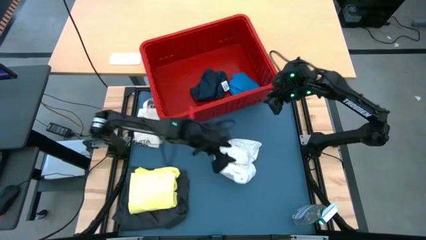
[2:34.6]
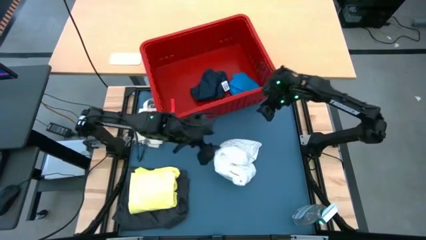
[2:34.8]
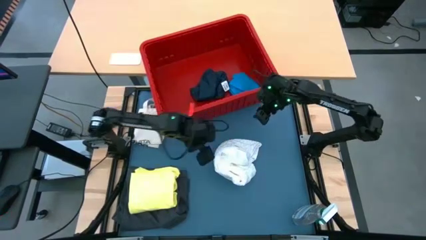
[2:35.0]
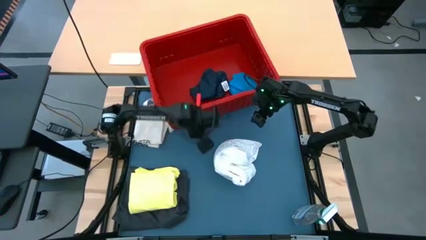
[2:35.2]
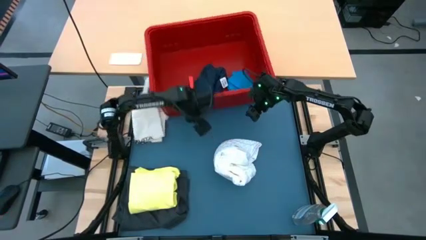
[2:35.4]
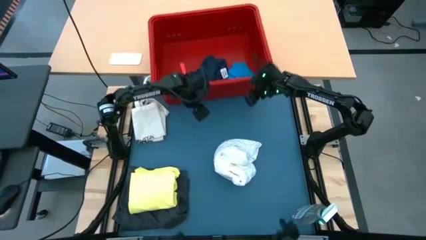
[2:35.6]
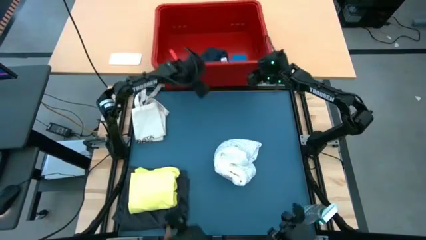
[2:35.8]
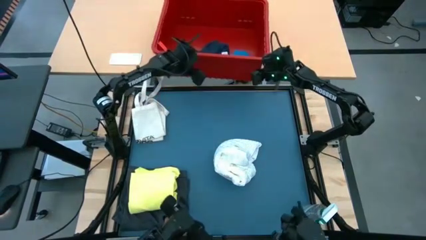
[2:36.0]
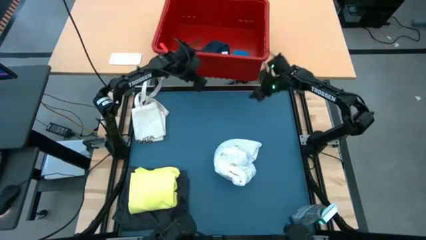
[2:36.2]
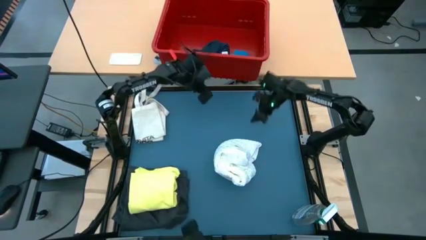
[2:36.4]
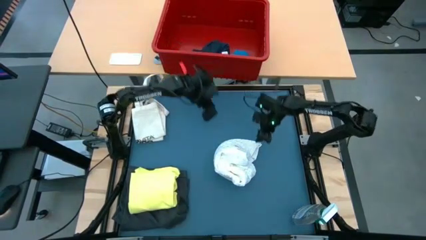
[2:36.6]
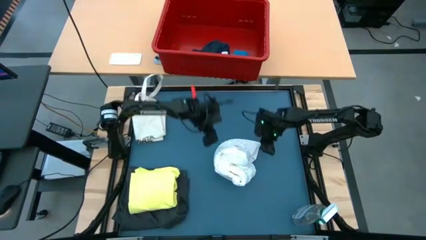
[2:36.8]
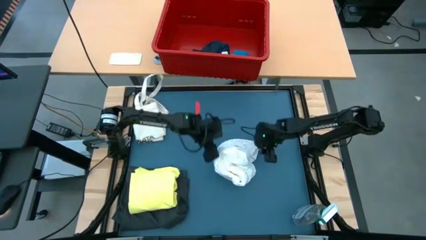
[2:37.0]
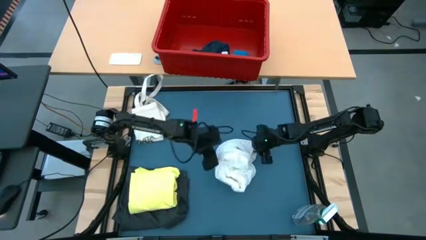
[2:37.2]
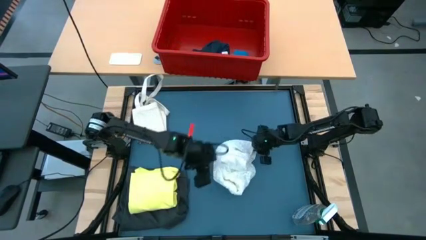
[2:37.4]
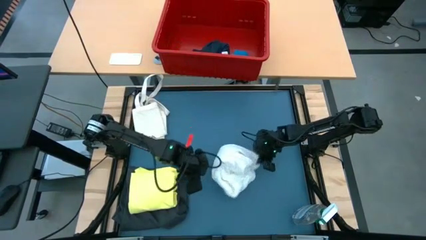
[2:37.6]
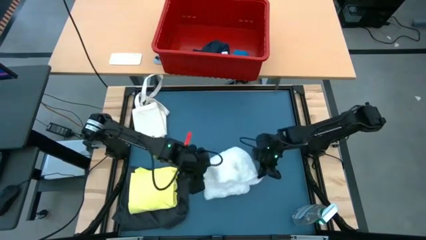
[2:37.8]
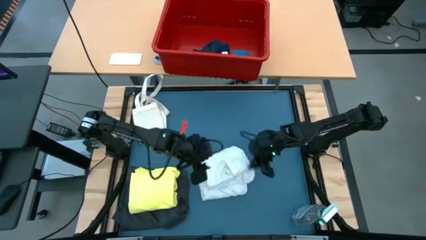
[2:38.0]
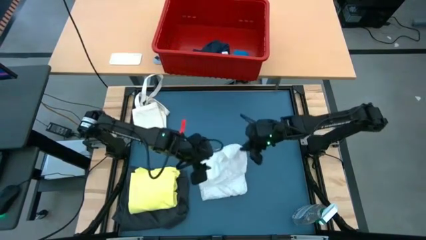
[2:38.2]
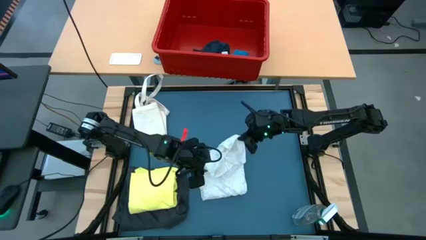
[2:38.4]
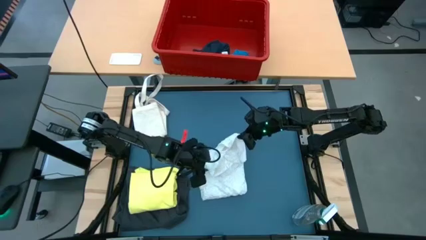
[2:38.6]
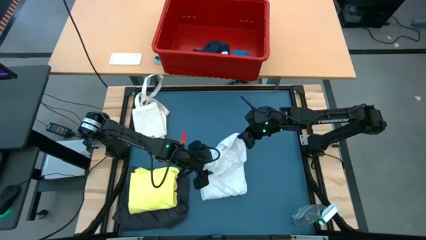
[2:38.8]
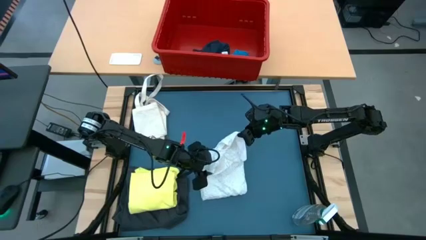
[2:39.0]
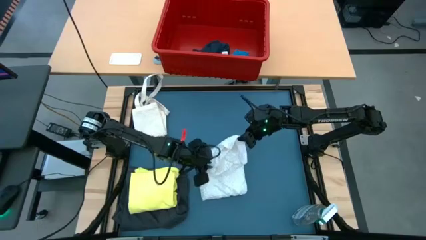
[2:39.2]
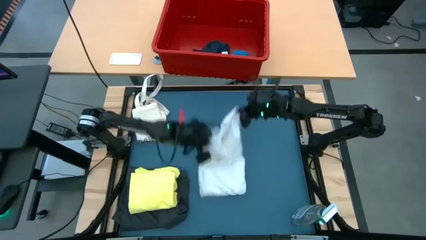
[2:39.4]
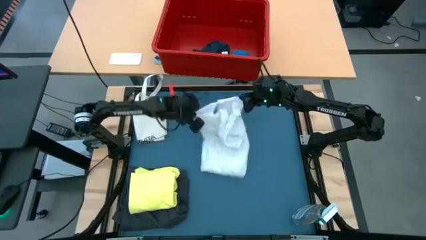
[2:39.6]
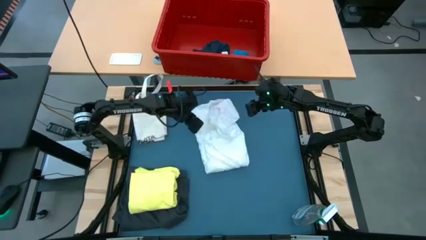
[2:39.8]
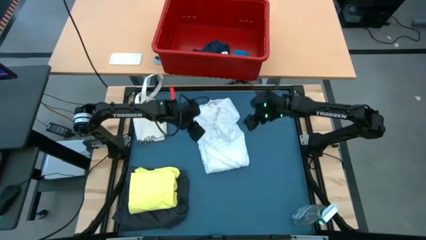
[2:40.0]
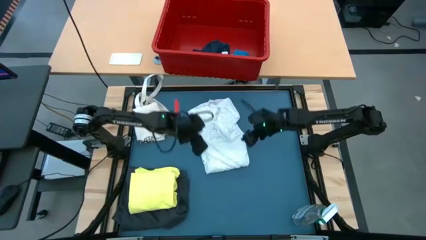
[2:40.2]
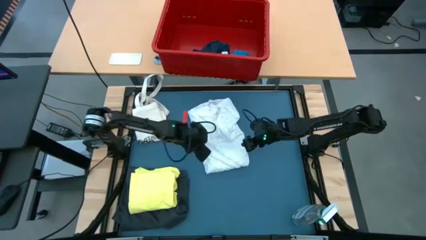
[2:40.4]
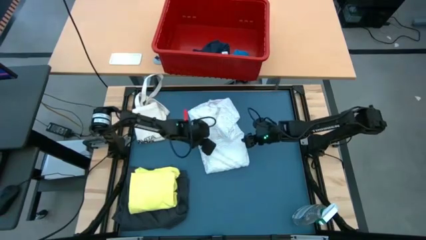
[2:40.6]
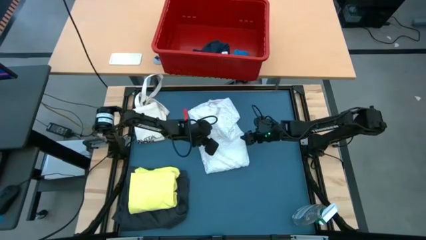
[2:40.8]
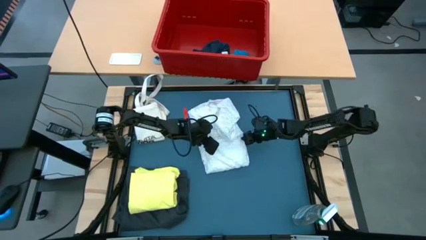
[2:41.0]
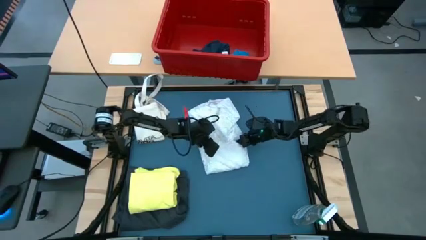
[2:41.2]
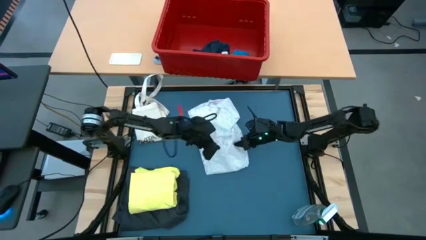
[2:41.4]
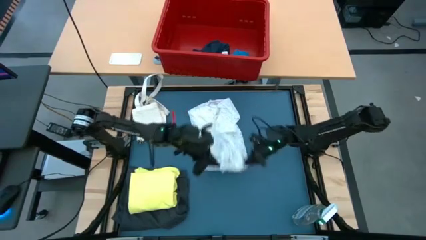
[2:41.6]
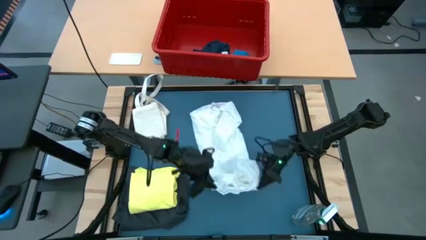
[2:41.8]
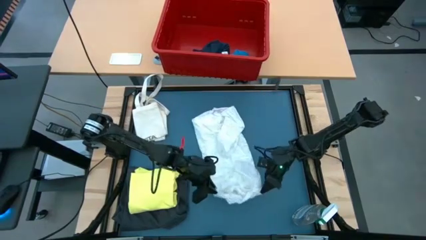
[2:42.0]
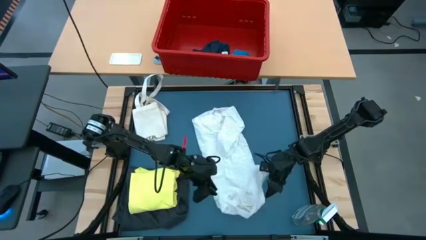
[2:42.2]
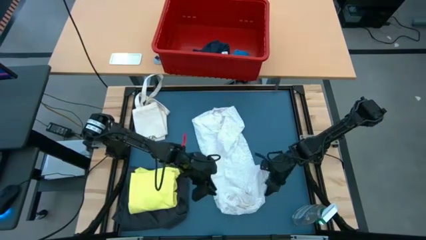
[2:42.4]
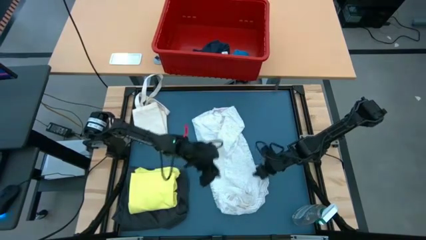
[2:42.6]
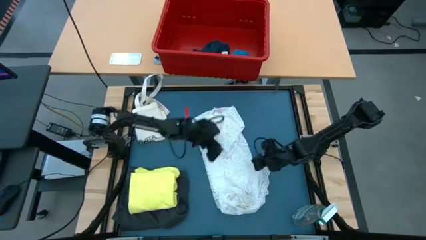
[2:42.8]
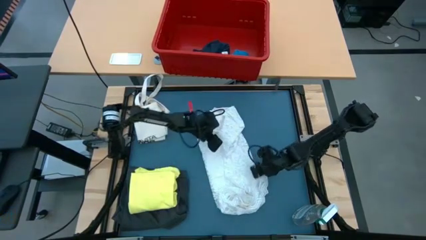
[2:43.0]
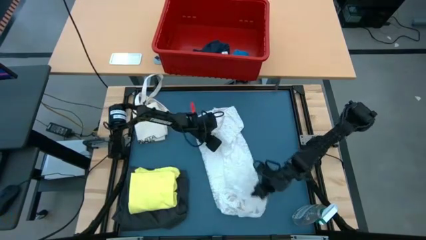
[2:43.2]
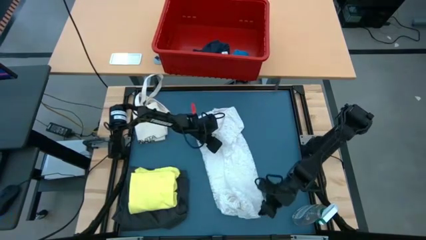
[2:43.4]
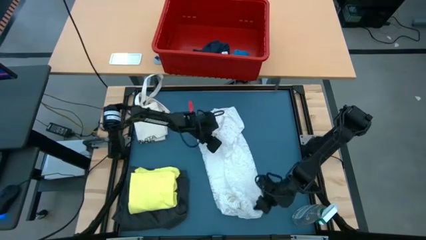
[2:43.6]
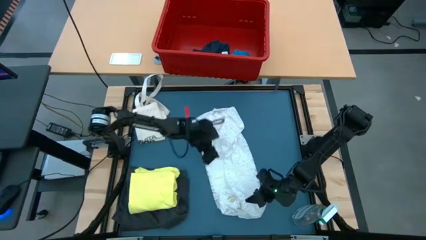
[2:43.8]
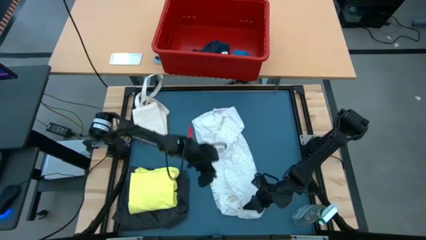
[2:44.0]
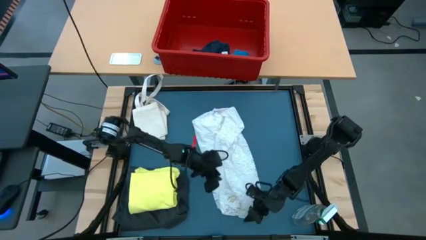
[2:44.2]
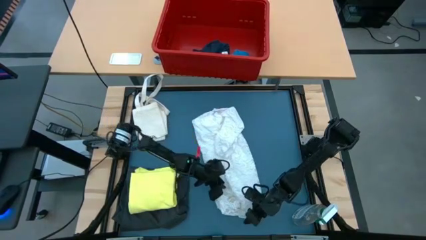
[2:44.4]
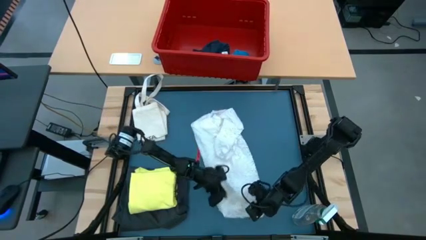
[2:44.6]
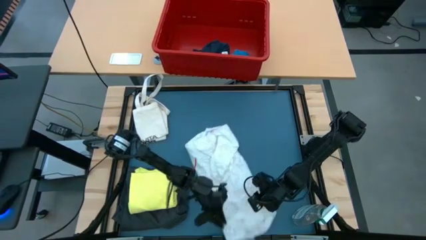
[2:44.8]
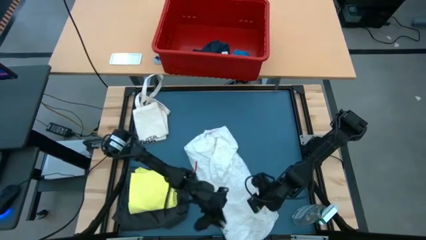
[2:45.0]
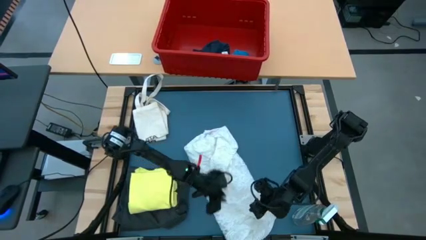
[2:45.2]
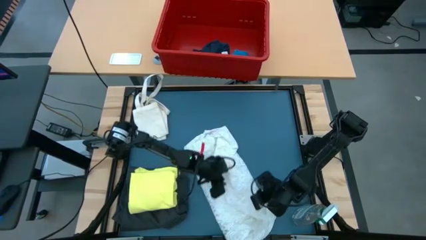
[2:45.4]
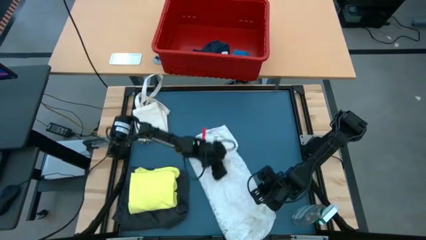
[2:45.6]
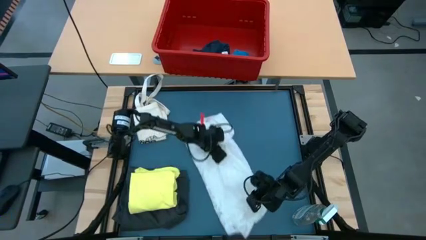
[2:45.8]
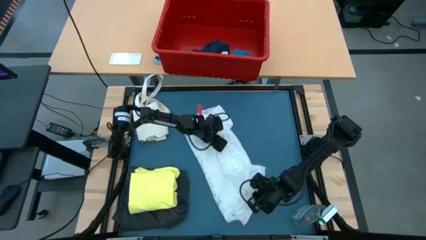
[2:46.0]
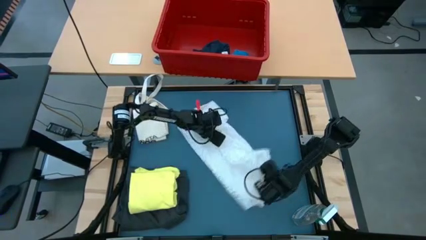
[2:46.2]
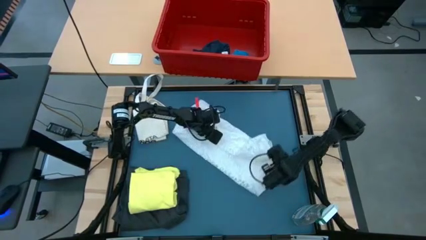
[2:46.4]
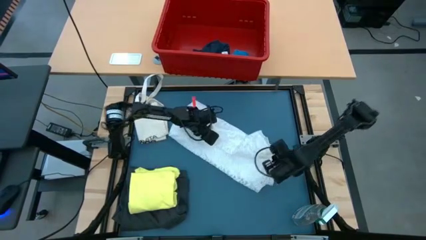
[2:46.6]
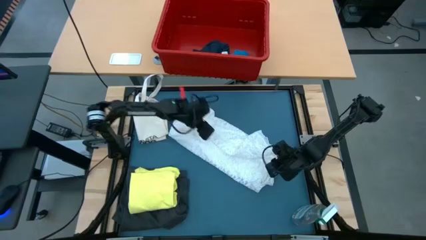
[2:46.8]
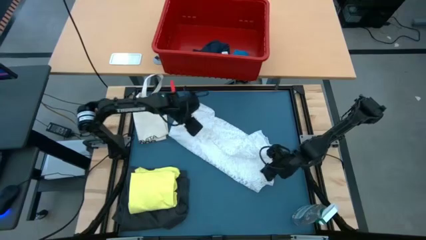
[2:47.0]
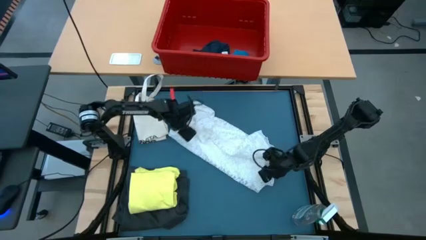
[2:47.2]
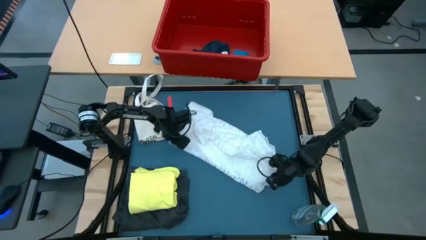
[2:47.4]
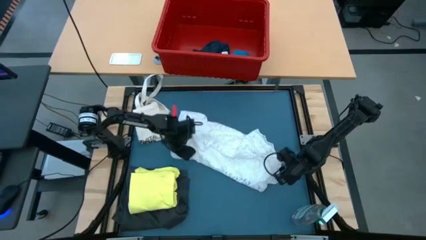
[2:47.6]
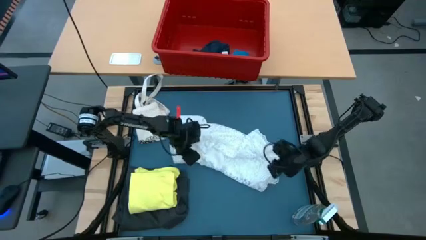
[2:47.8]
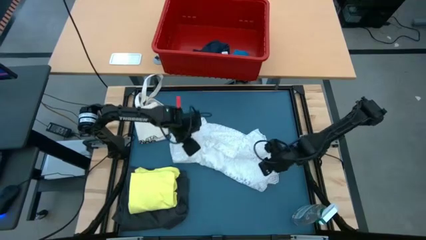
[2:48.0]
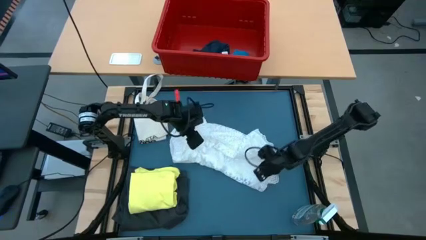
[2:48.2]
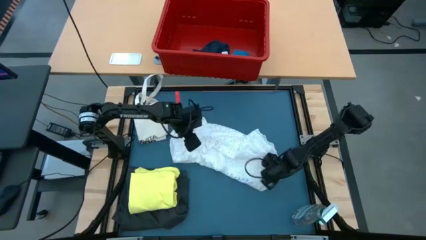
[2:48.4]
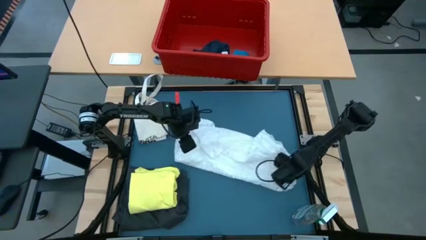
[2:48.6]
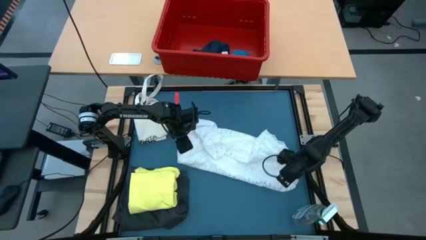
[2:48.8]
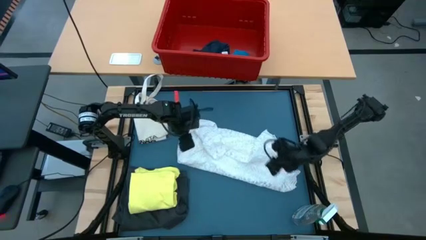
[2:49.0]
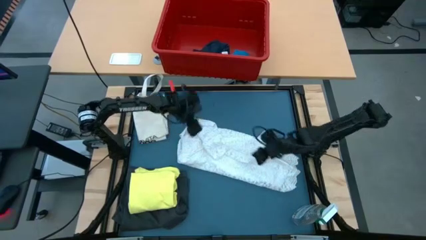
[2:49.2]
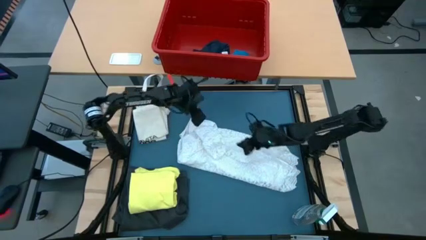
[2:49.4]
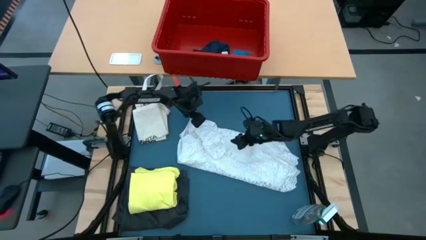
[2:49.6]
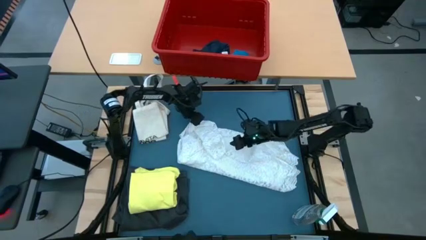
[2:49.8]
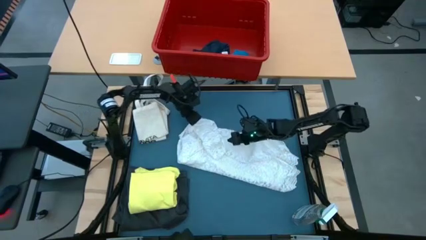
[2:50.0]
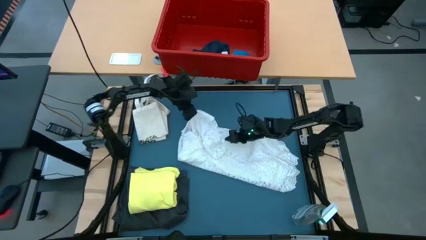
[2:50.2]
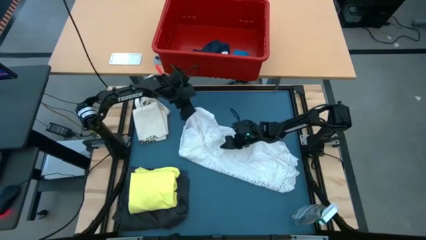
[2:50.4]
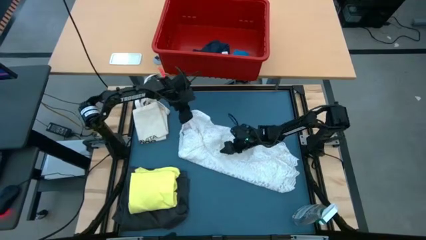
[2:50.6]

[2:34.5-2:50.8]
Task: Fold laundry
Fold the white blouse
